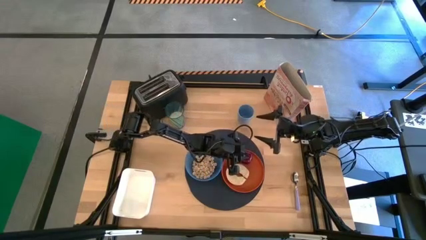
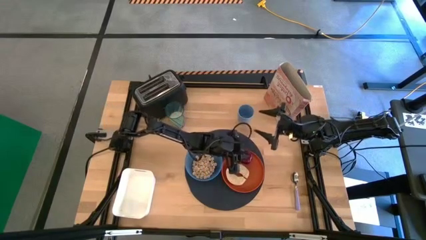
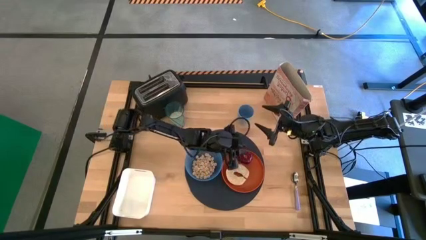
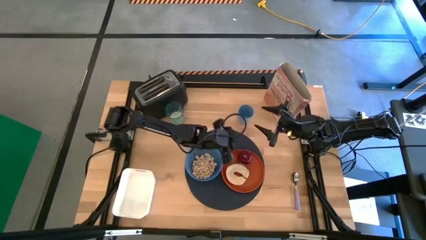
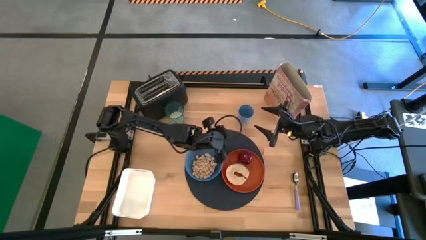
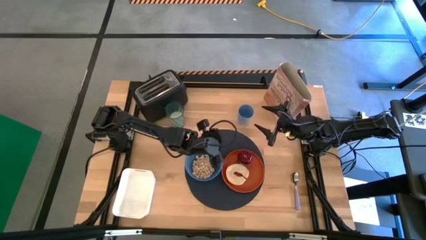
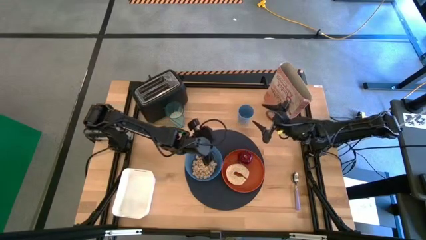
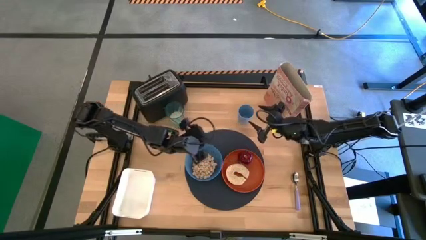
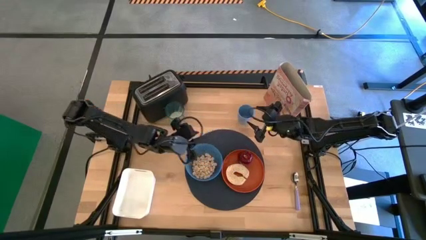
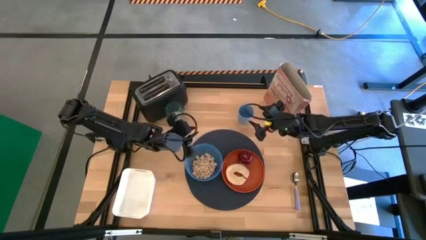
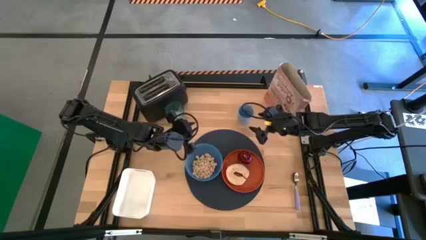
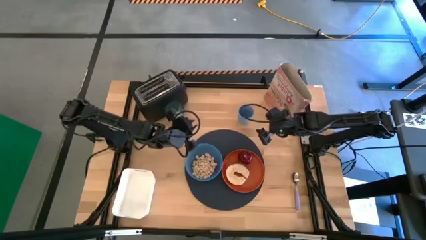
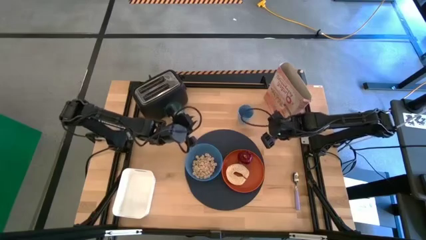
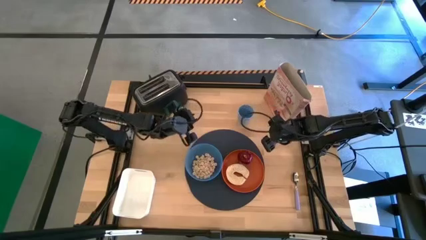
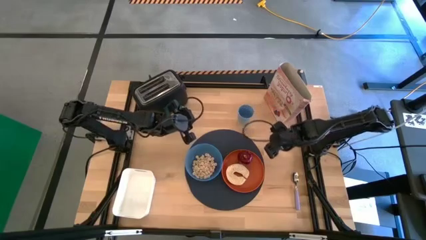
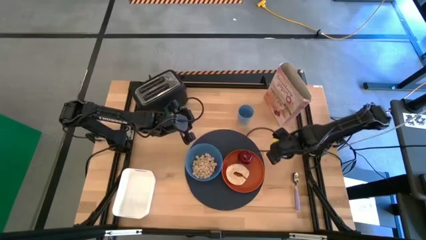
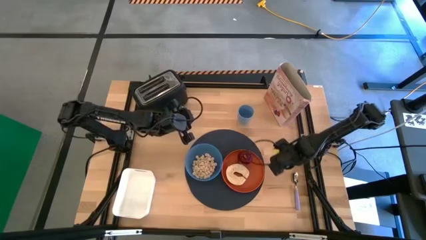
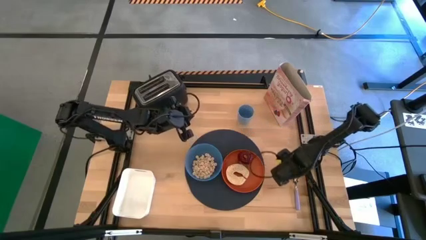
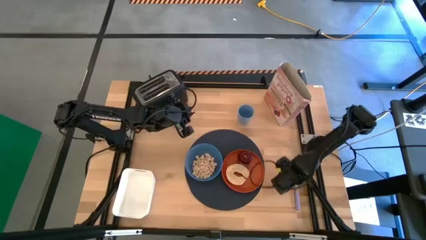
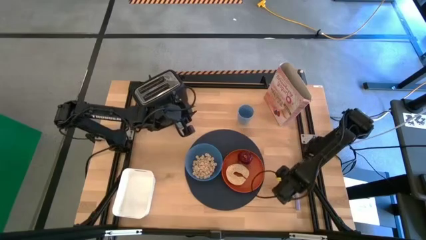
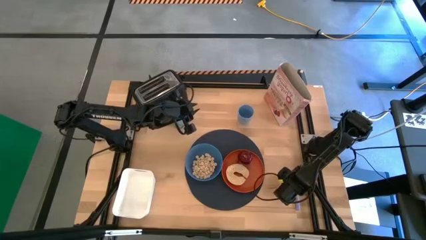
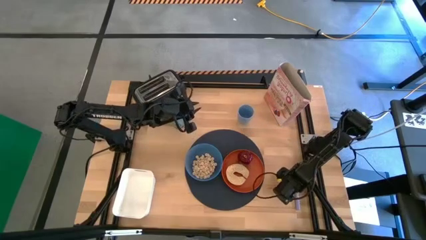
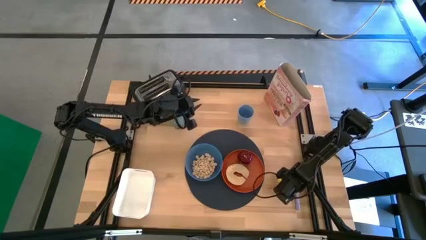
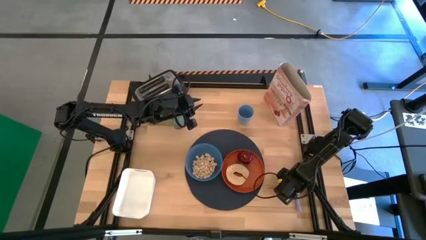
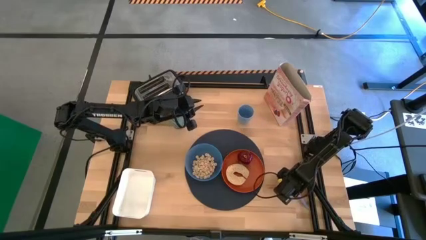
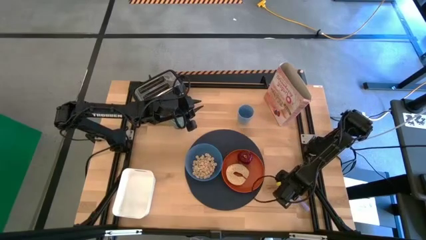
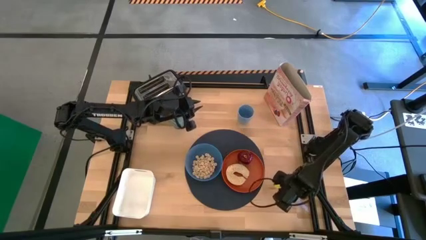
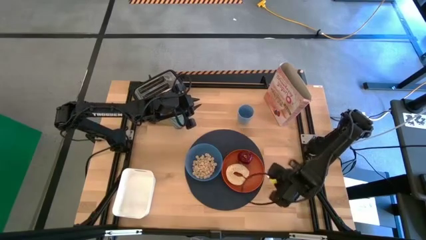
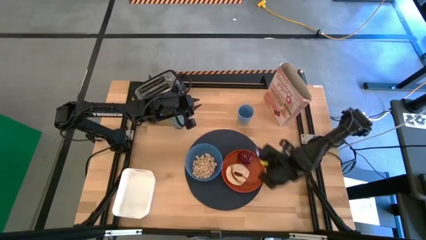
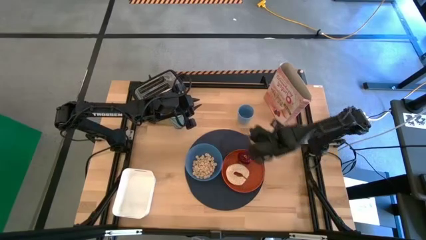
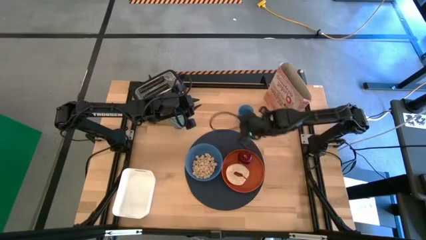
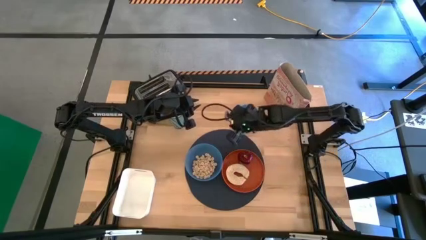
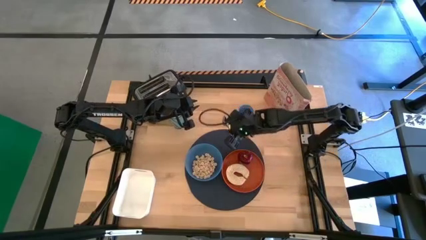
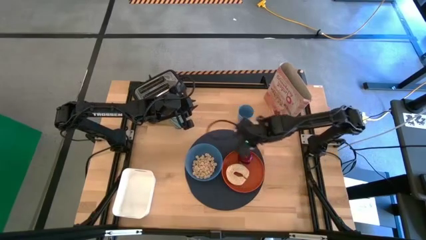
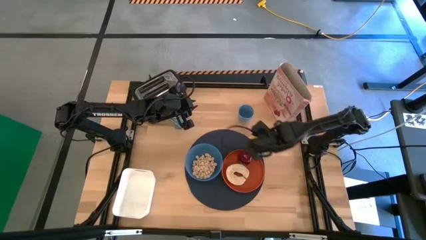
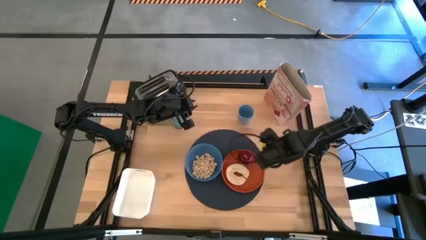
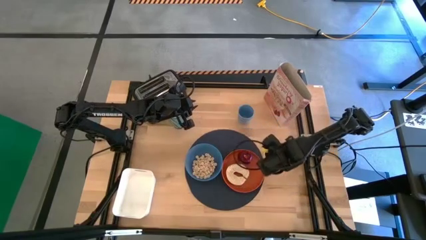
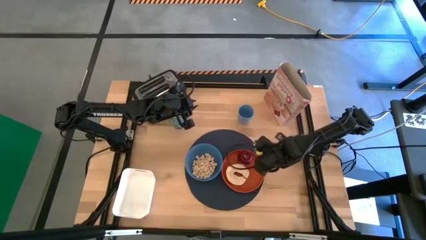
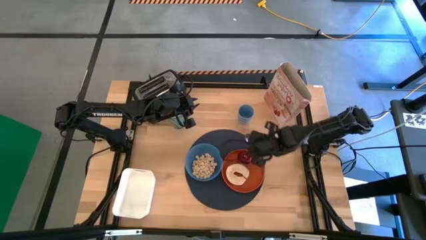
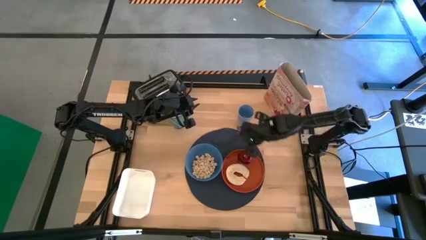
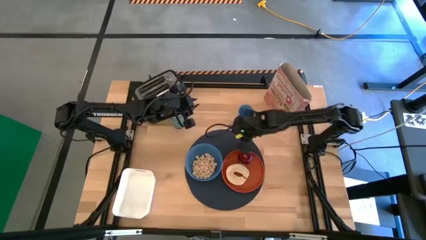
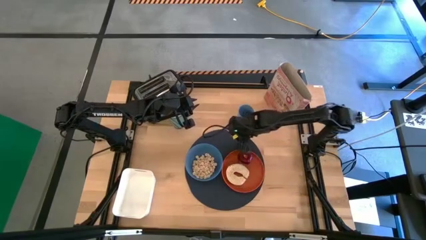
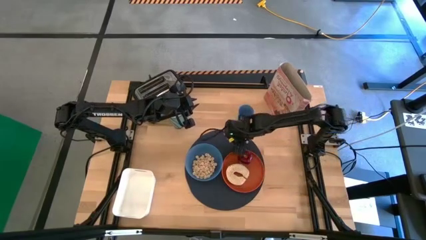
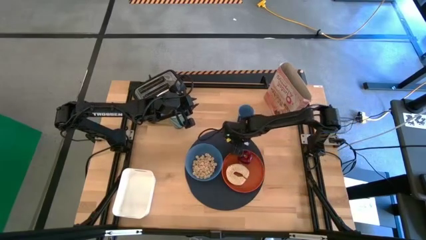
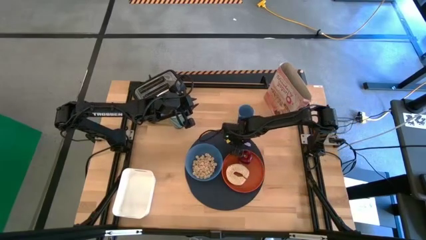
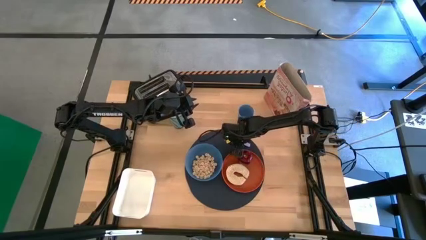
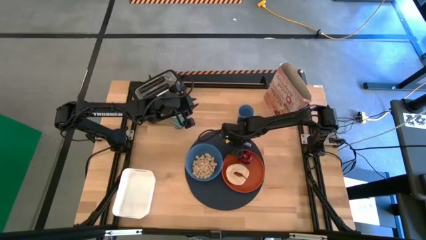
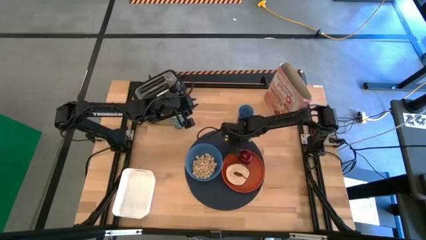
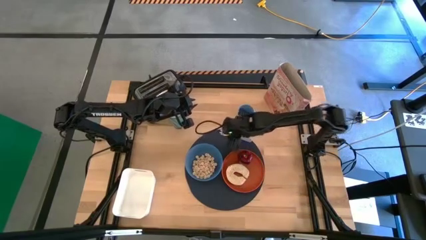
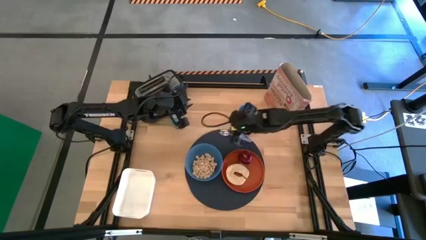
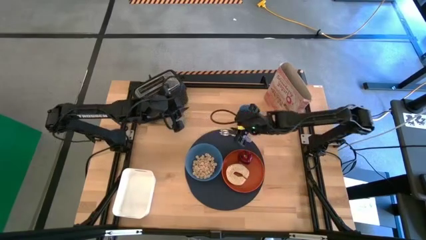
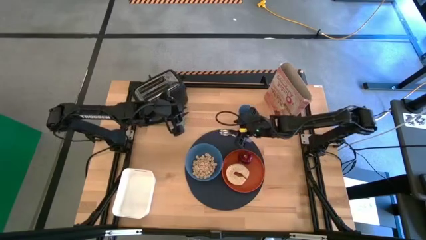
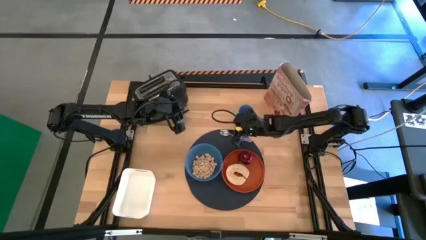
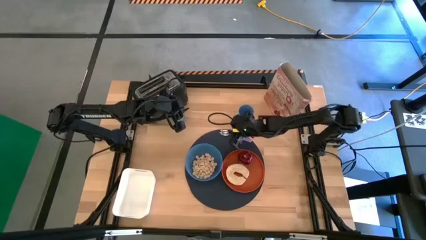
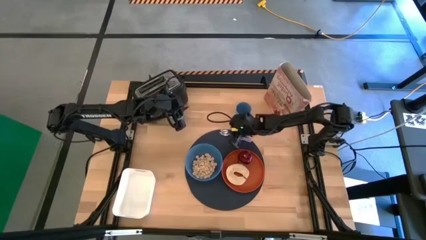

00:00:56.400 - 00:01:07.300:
Task: Arrange a breakfast setting
Put the spoon on the placemat
